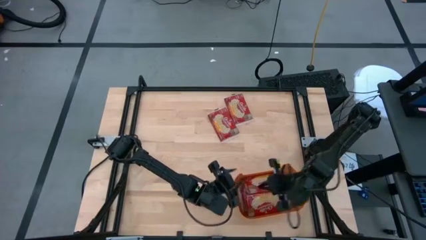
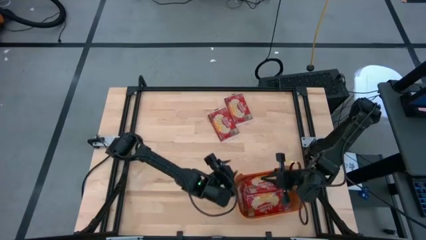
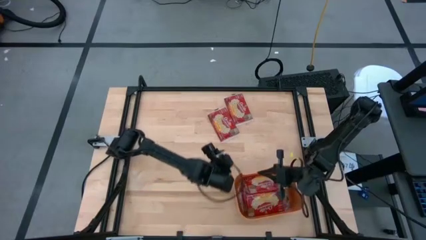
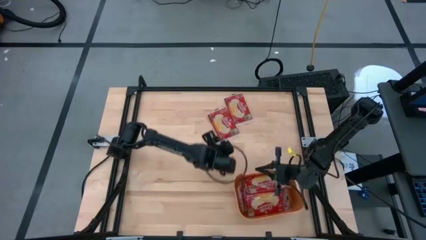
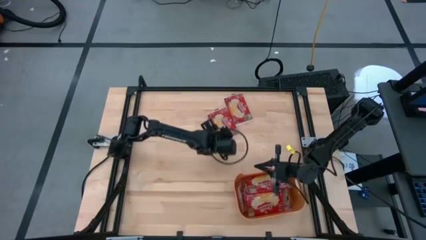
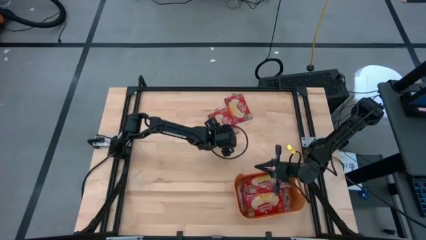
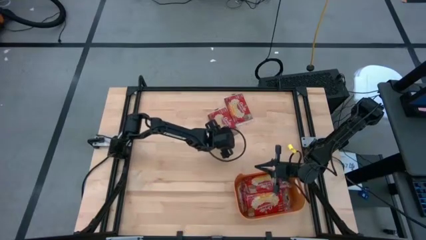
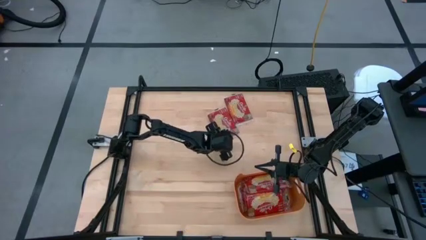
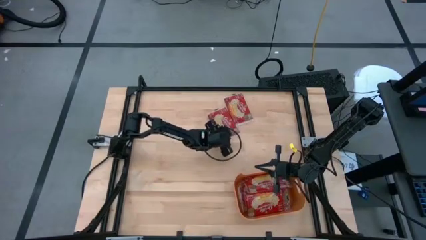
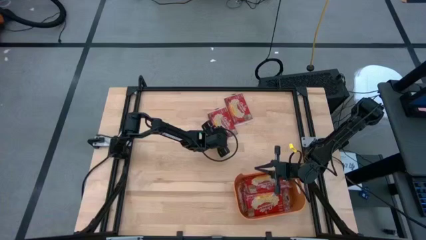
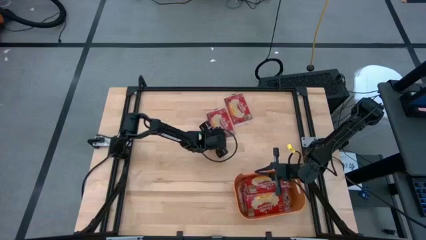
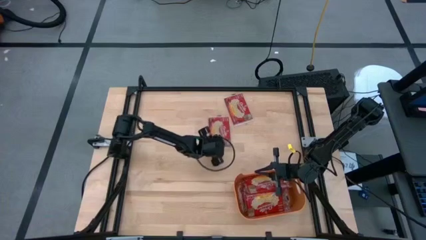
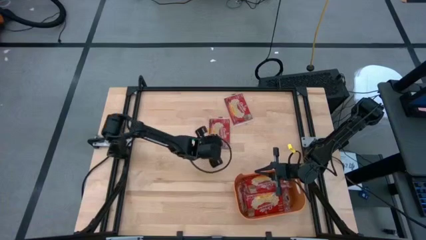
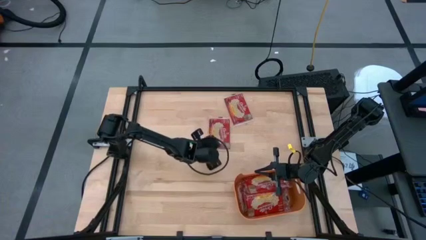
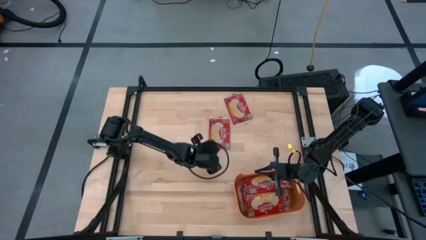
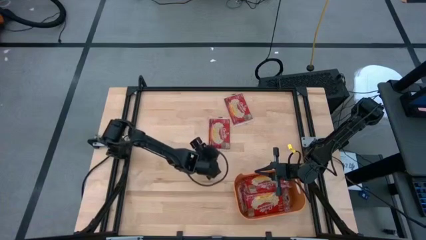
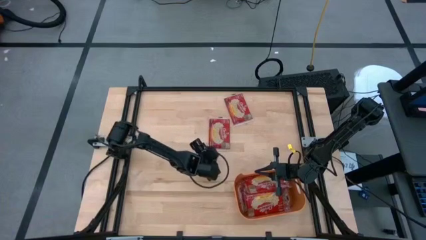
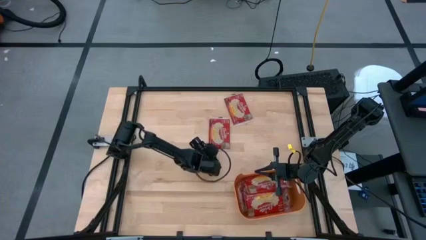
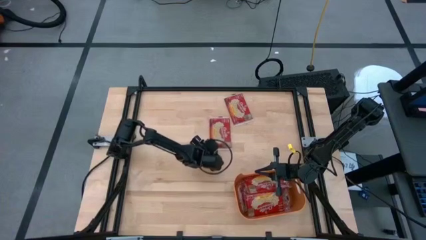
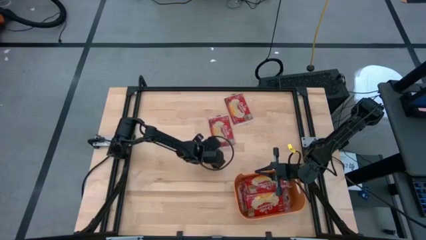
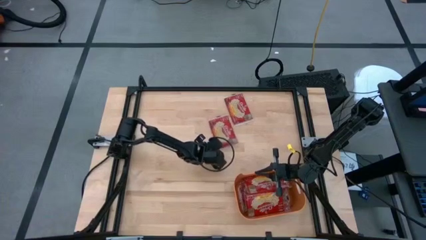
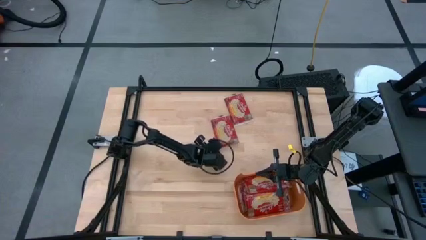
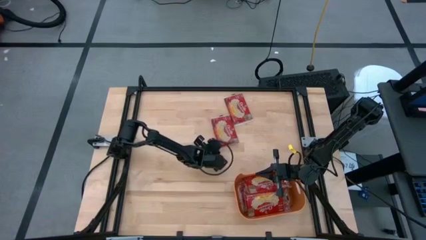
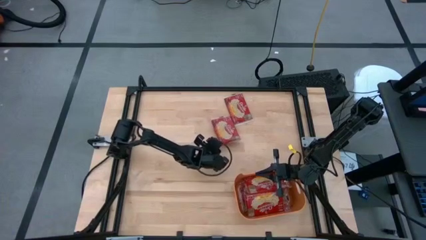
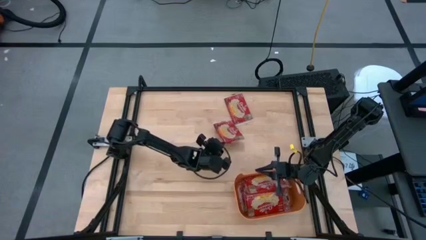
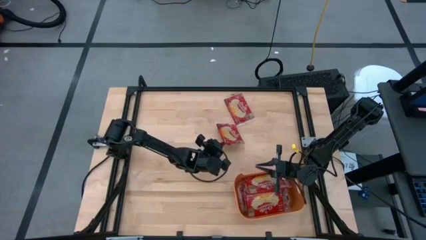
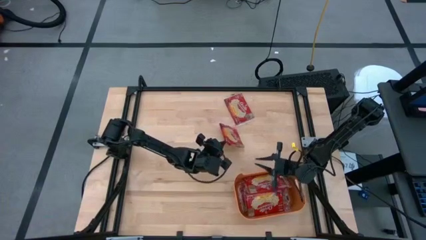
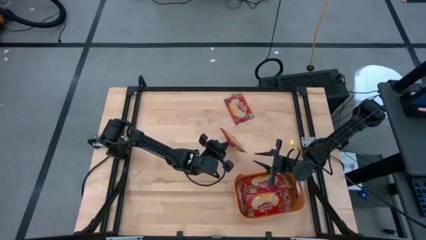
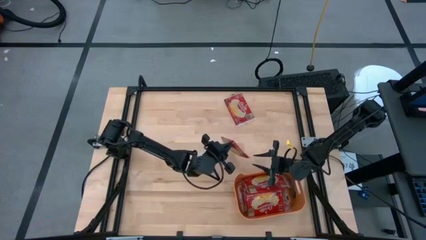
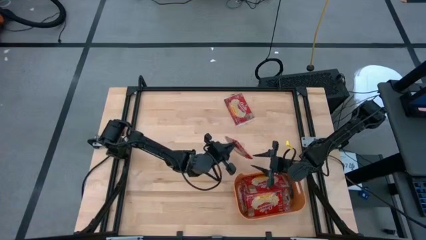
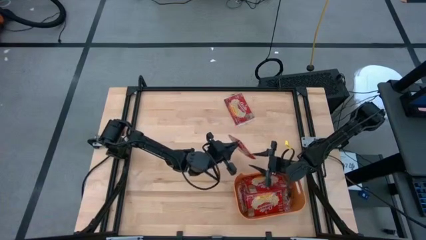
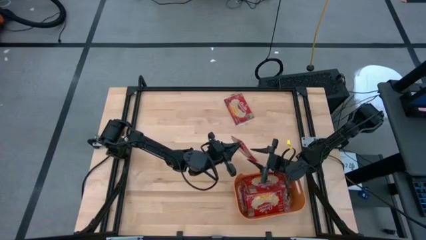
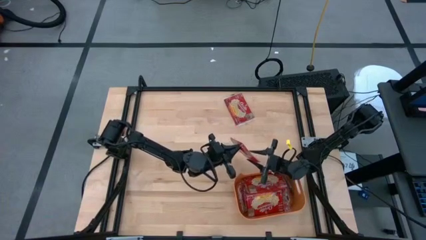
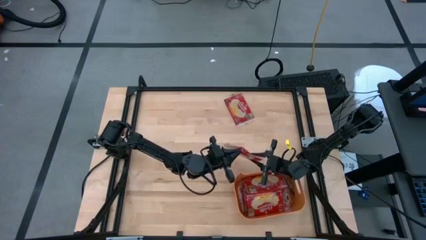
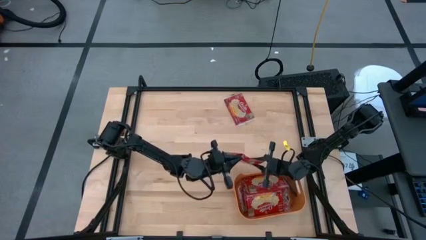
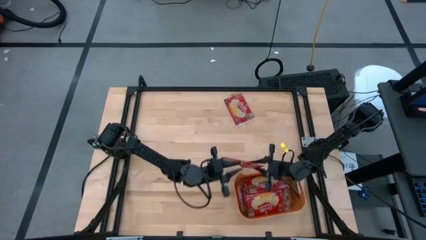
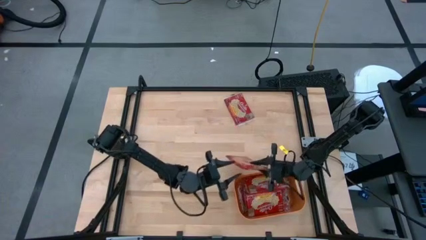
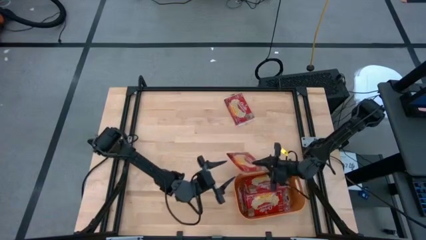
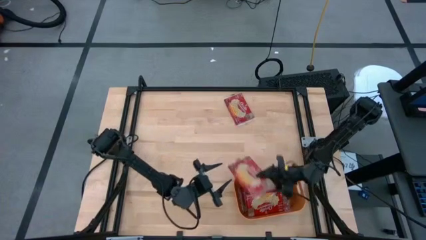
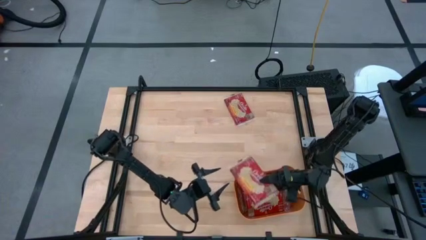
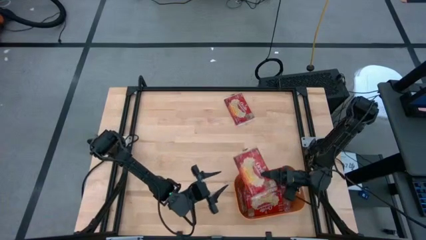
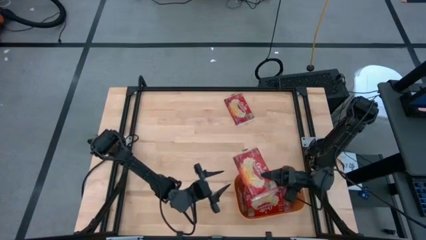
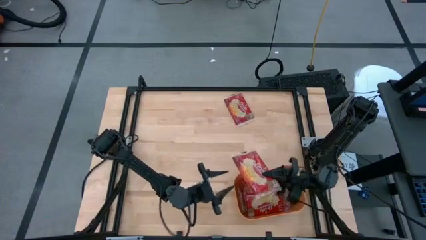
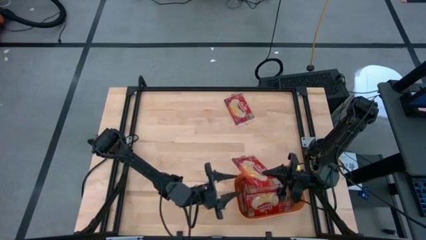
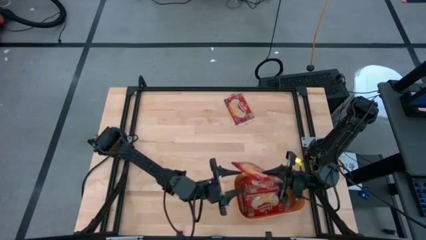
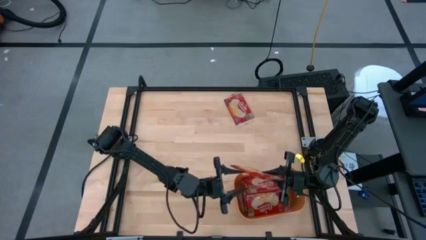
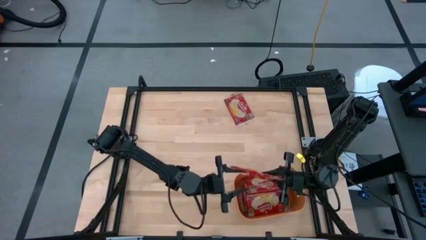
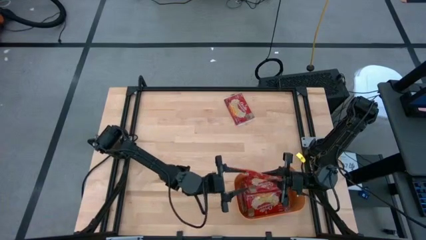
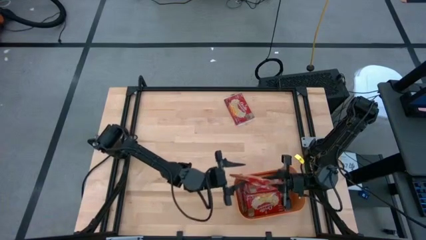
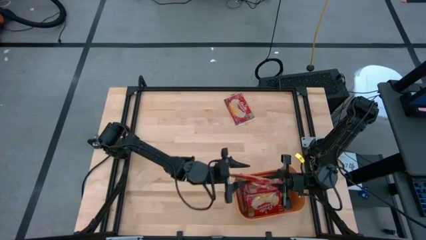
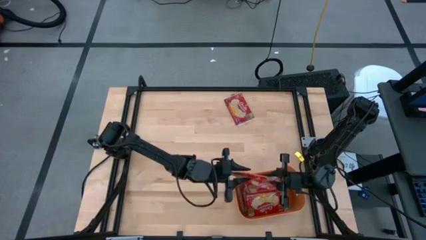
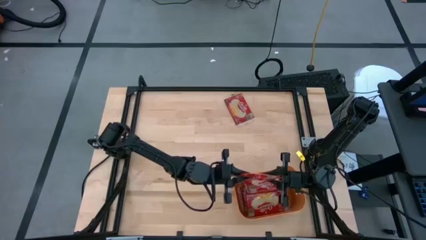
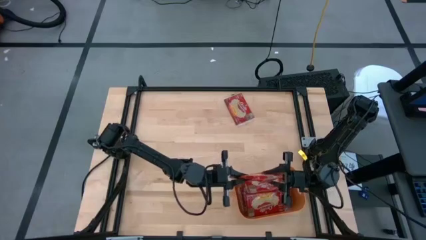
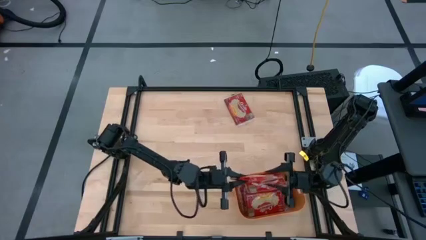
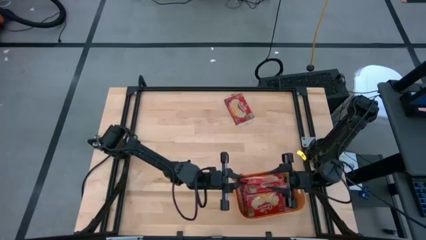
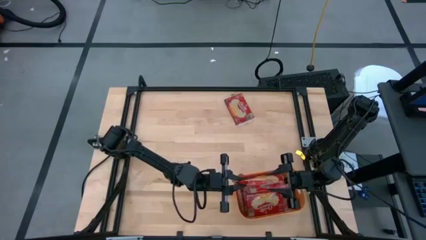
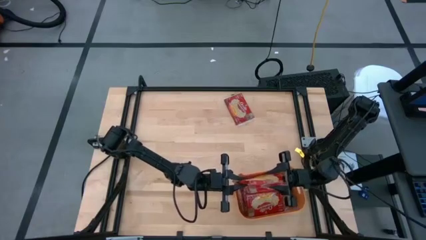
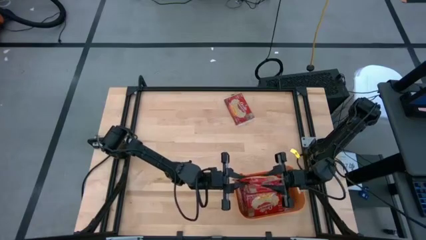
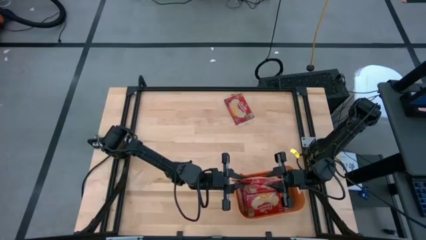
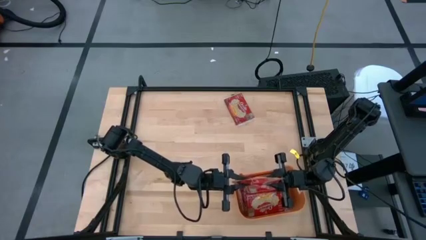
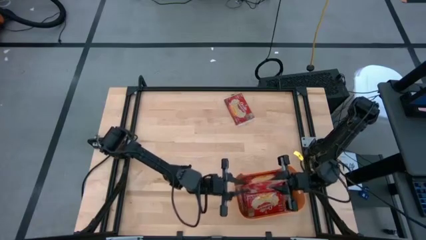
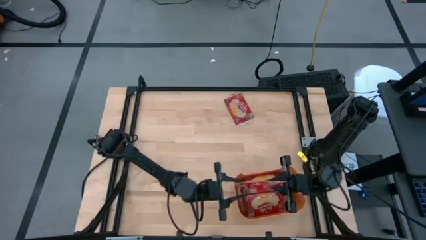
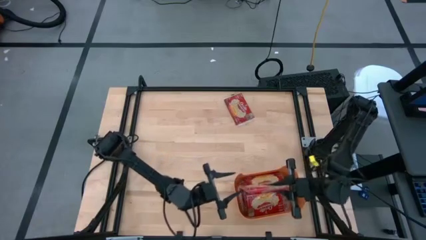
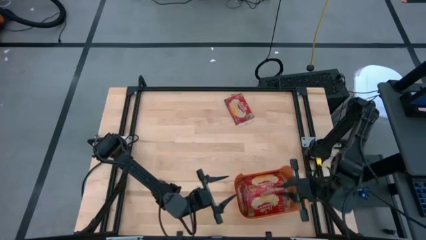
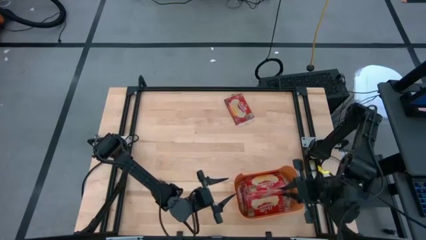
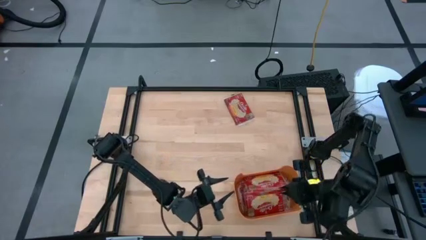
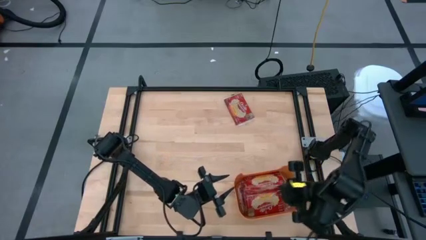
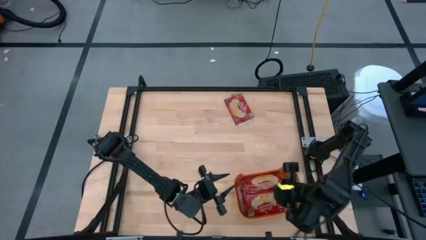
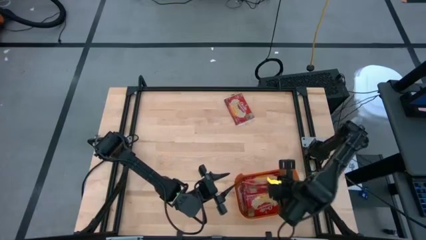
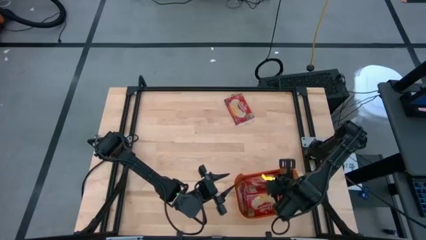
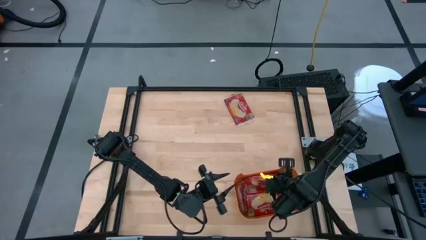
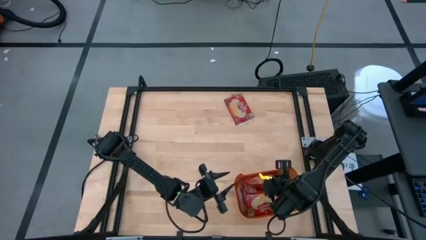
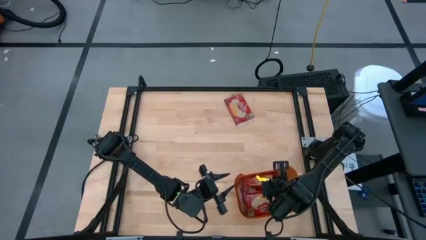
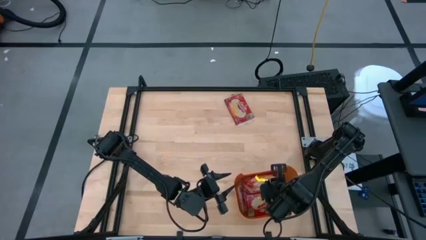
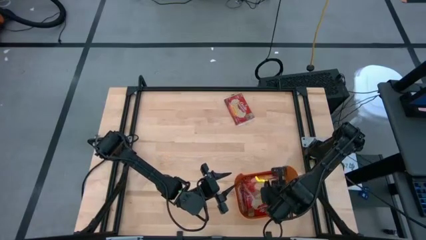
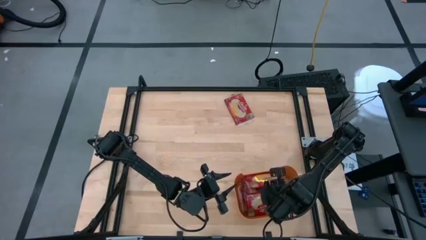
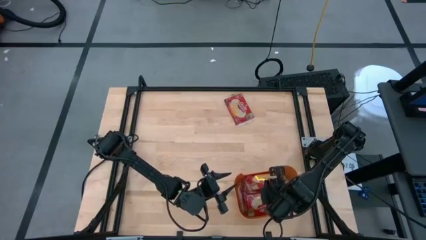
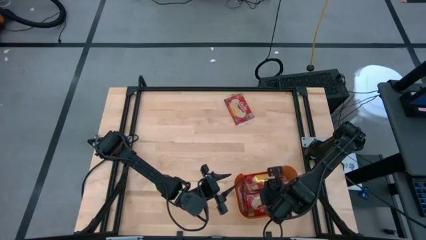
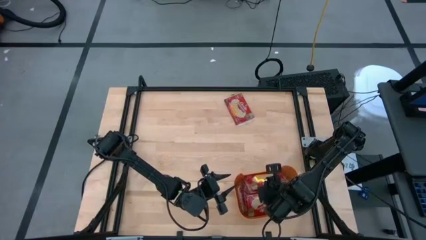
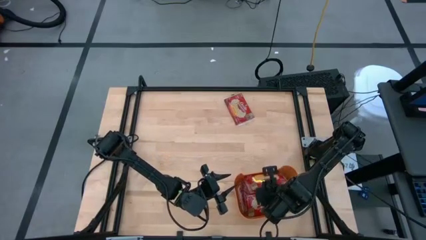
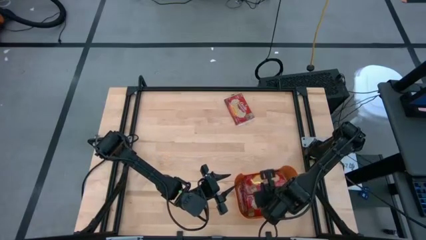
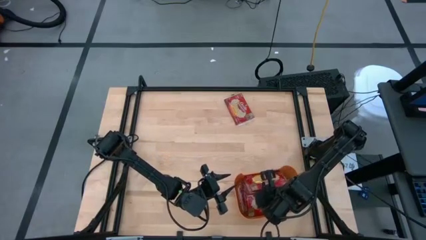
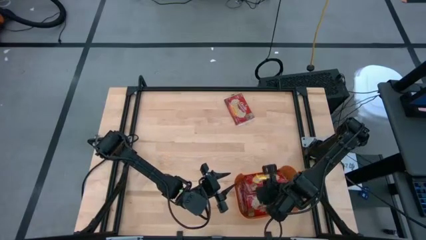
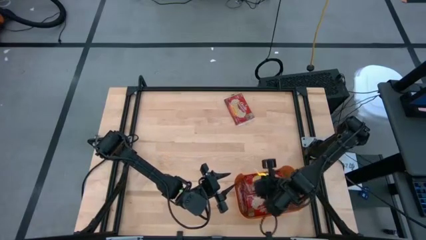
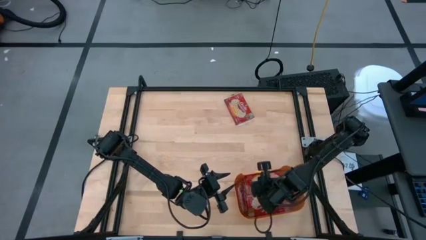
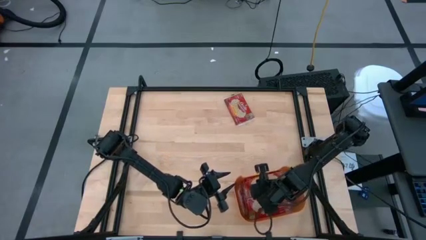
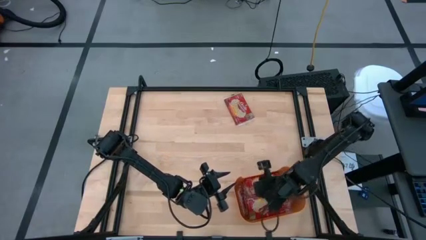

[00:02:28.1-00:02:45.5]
Task: Sort popcorn bags into baskets
Put the red popcorn bag into the orange bin
